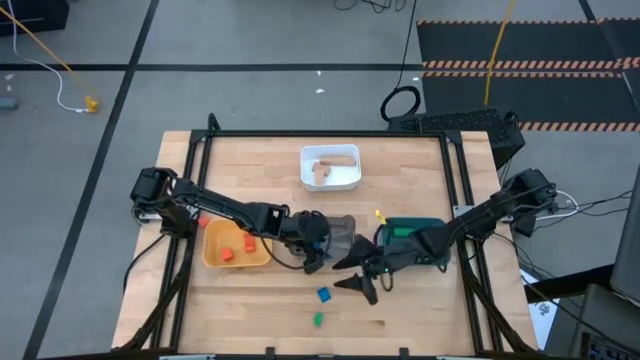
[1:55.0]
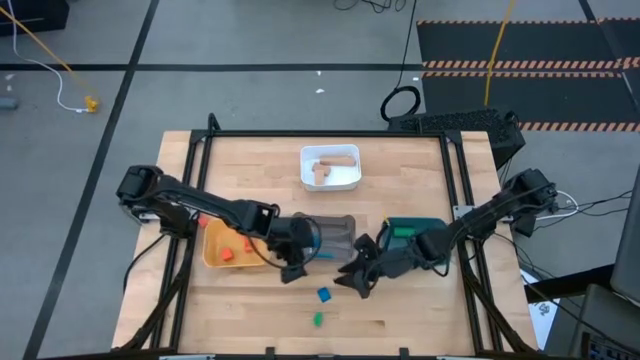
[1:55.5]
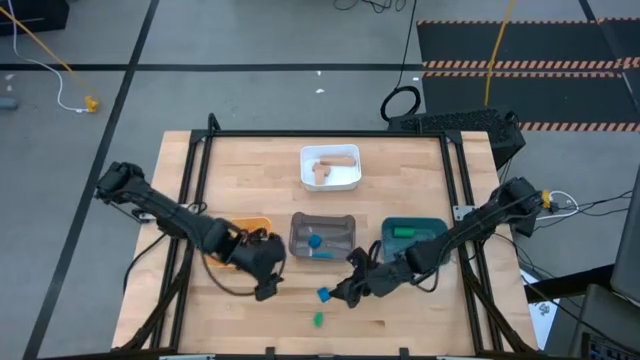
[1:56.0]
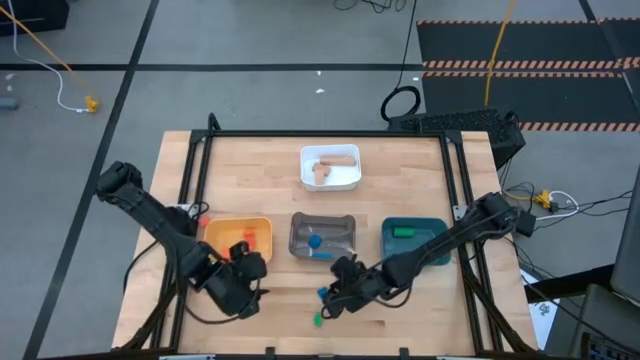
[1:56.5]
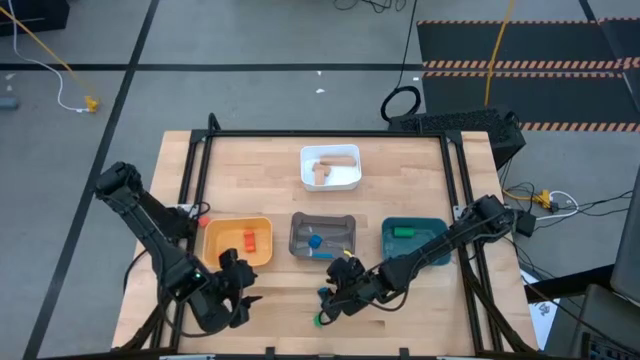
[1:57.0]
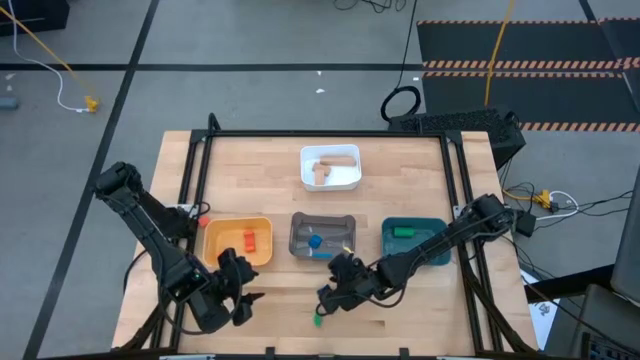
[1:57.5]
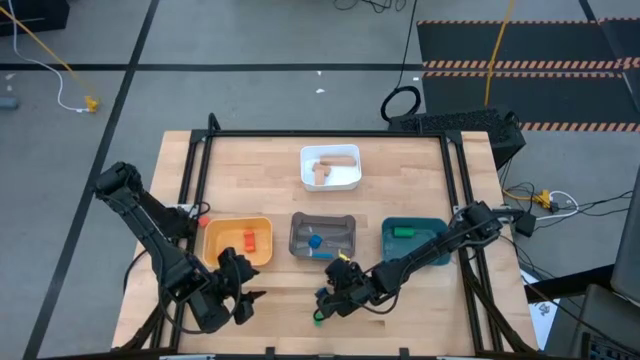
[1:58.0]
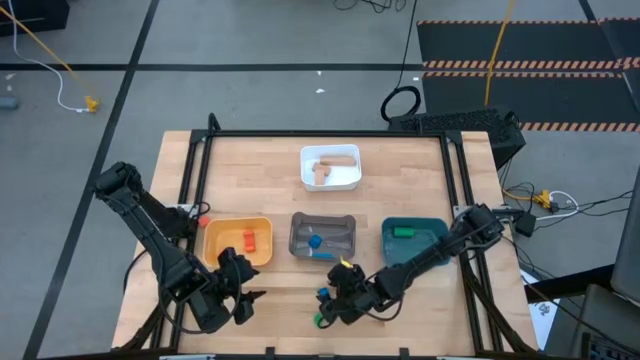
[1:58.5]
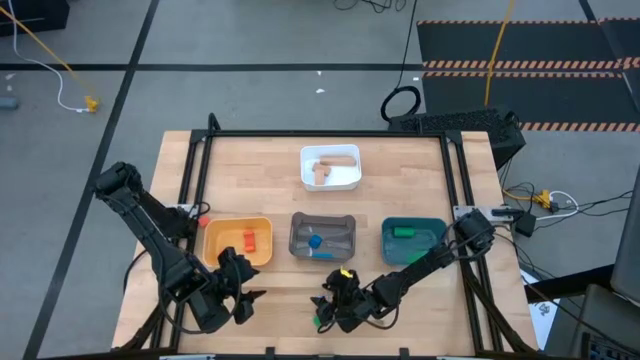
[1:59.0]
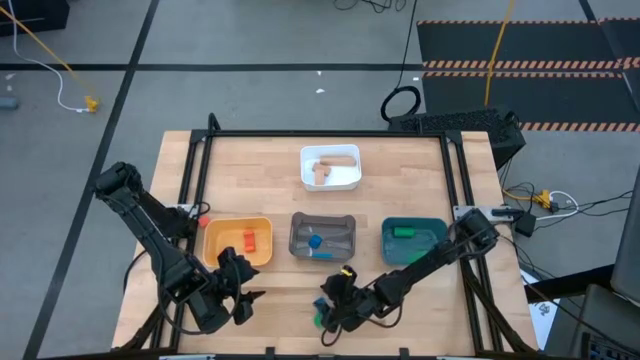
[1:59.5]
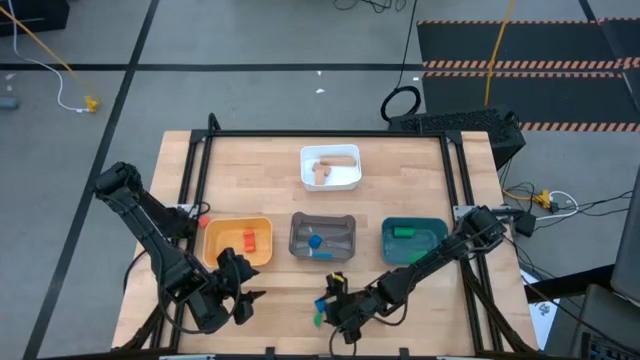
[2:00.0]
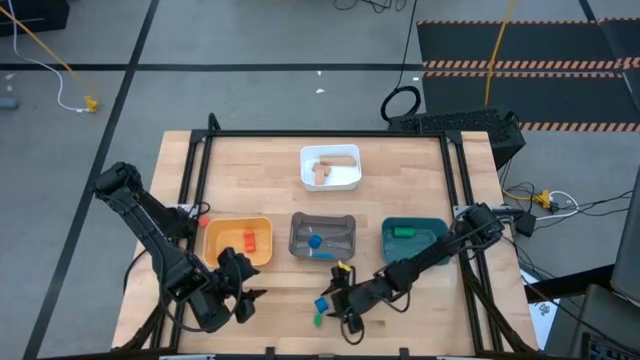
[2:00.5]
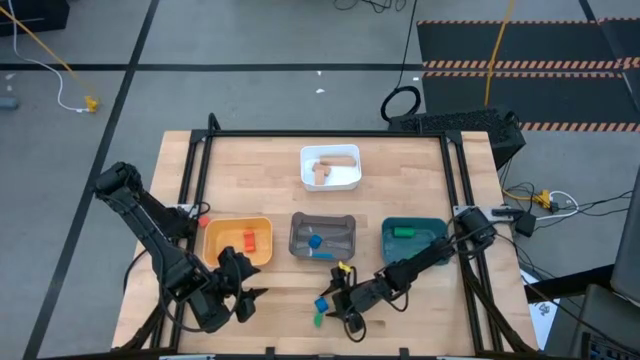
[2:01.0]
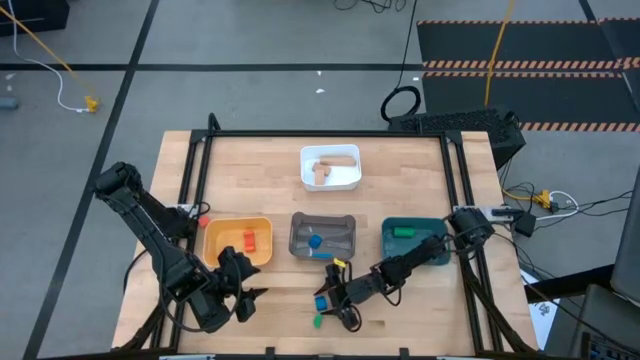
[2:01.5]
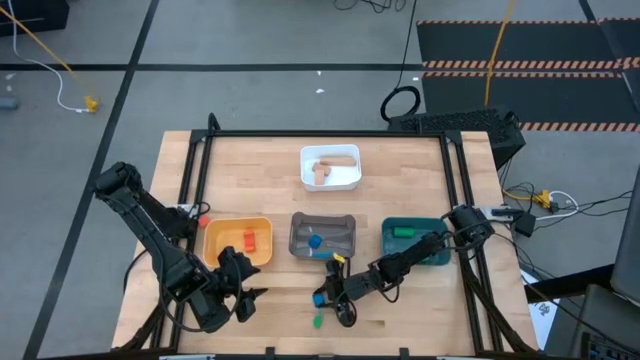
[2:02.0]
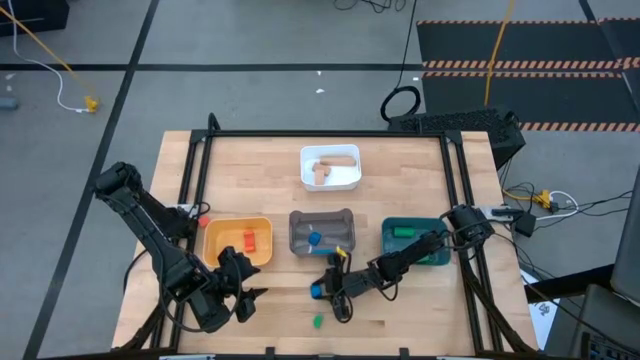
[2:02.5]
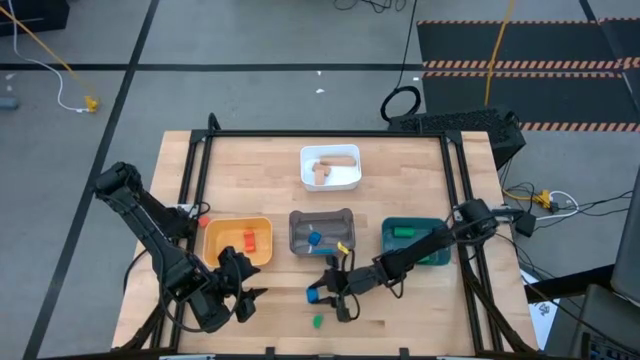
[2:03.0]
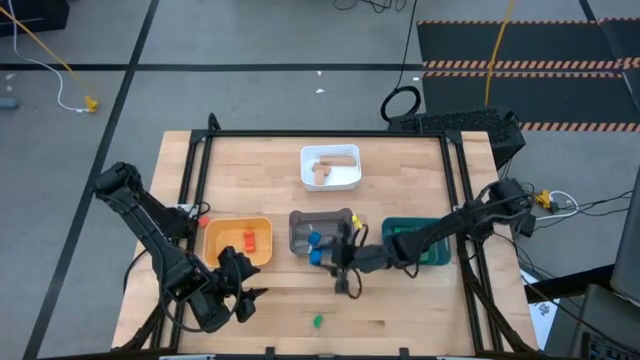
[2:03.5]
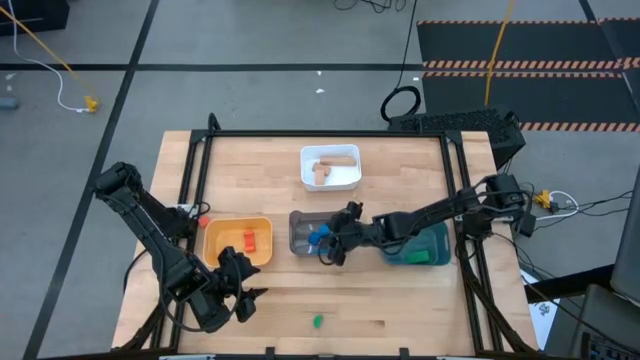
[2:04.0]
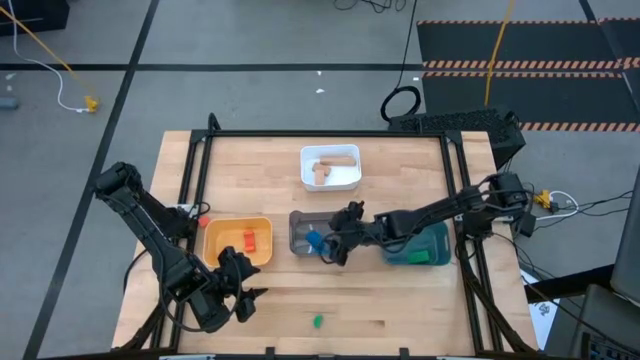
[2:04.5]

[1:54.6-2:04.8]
Task: Sort & place blocks by color
Put the blue half circle block into the black bin

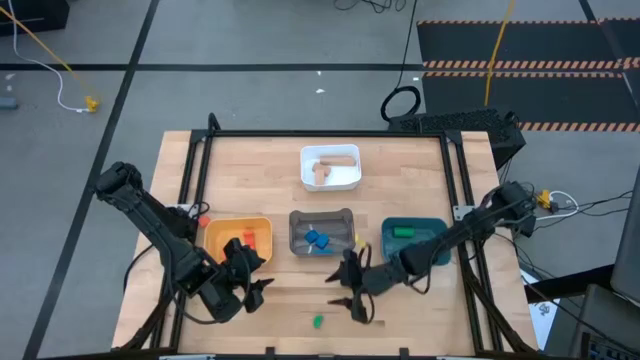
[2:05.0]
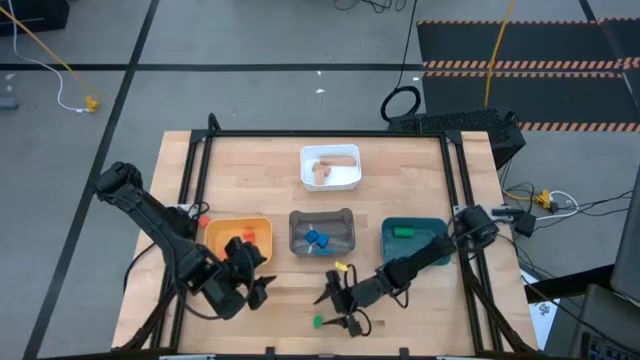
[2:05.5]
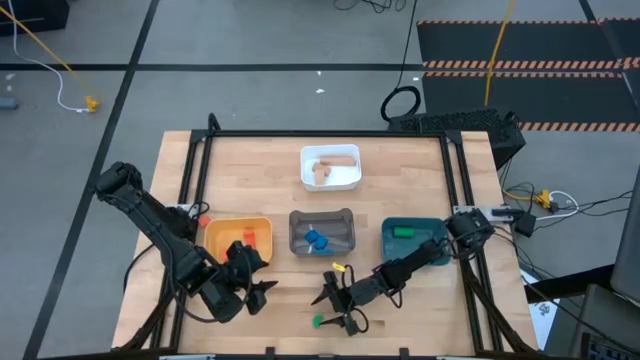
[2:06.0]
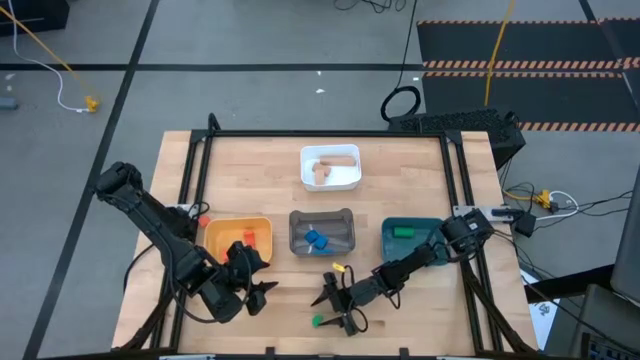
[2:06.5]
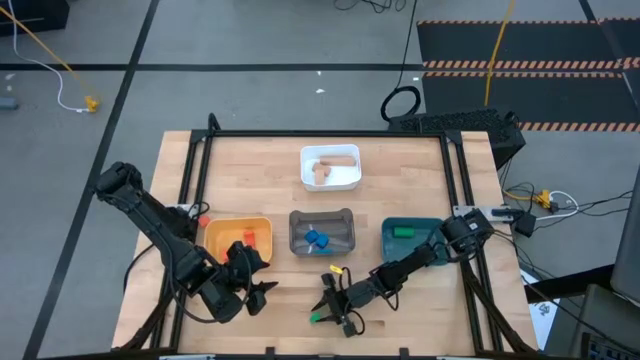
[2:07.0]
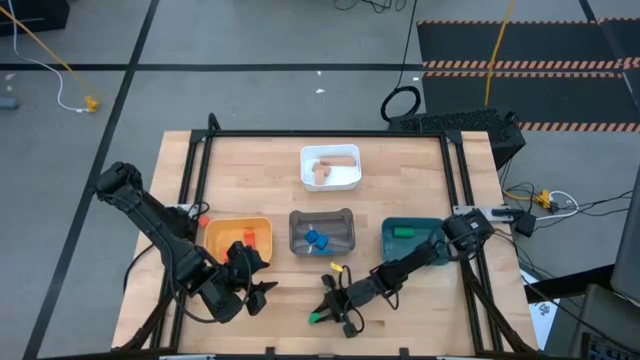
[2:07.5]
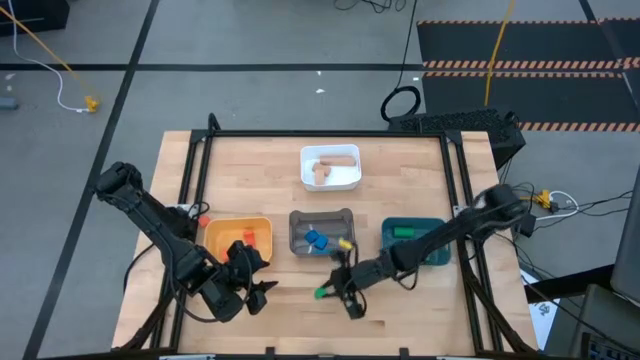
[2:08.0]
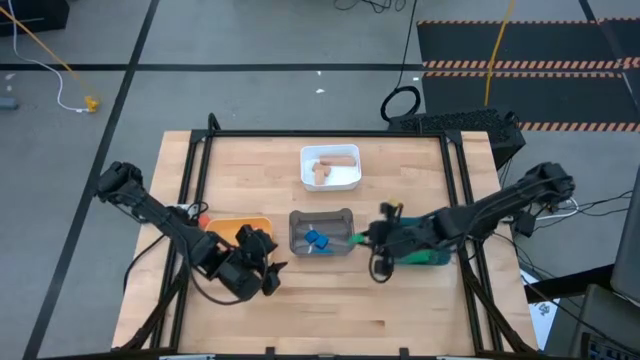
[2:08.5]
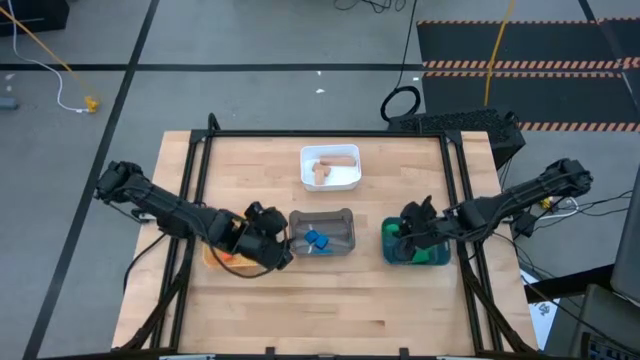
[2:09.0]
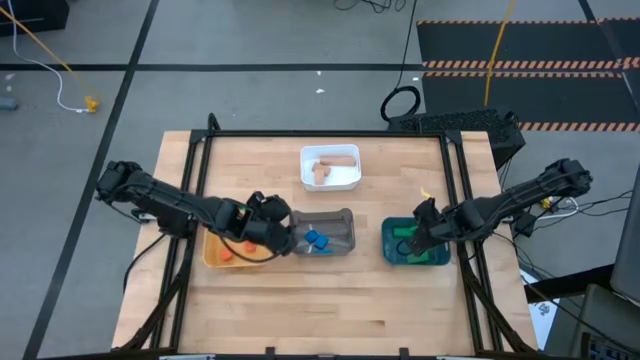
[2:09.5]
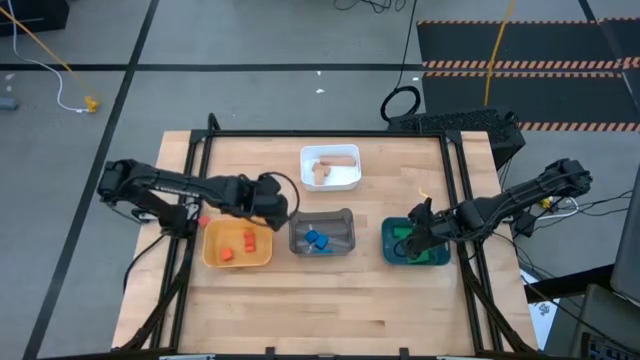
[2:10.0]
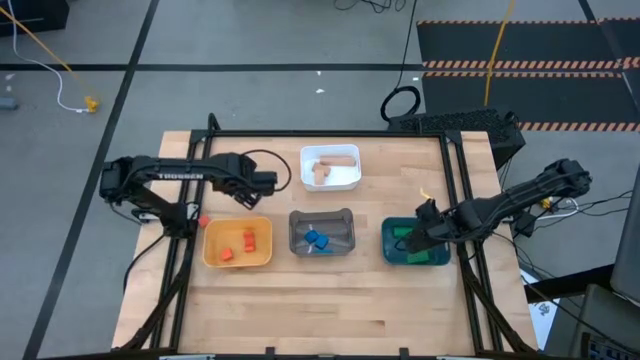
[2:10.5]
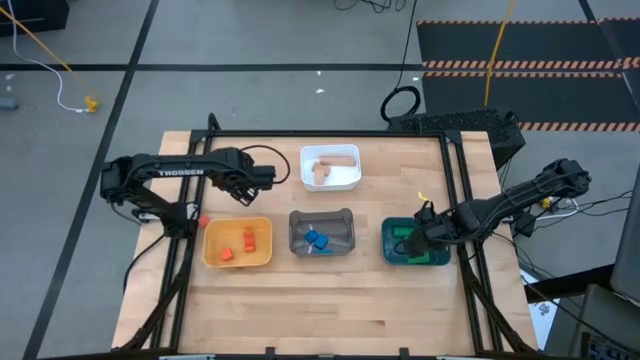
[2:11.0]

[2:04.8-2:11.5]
Put the green half circle block into the dark blue bin

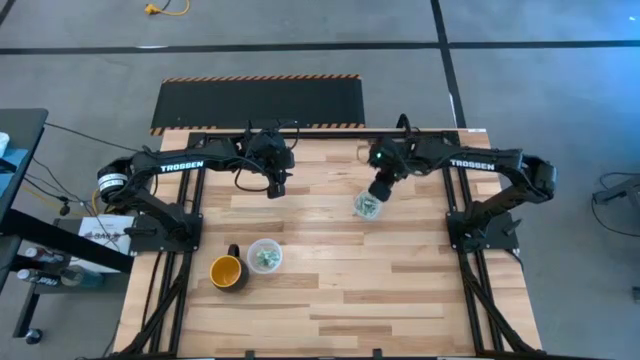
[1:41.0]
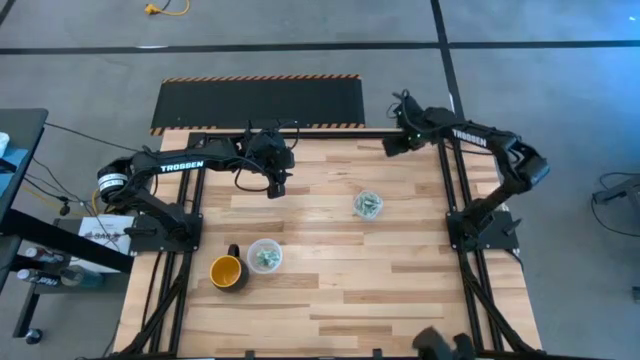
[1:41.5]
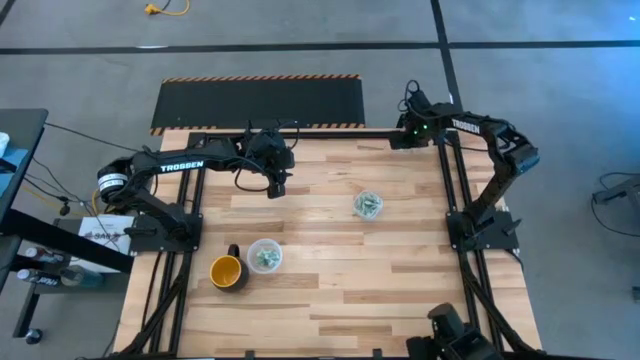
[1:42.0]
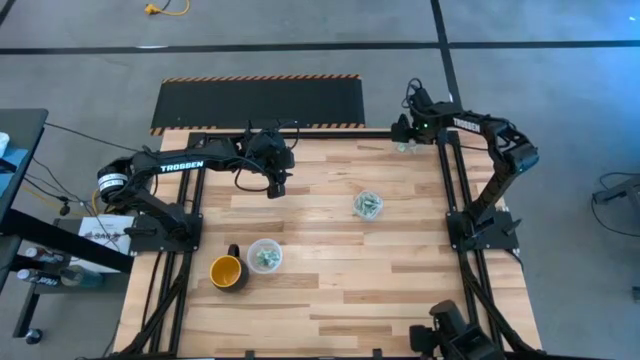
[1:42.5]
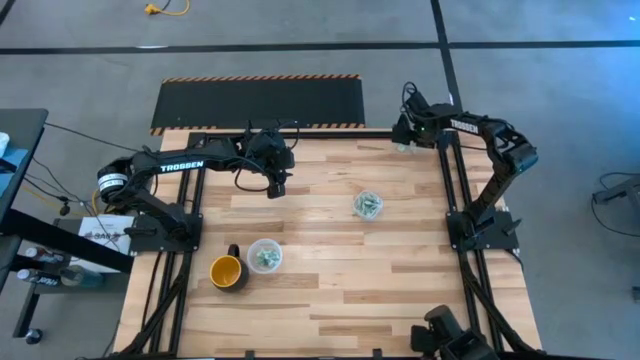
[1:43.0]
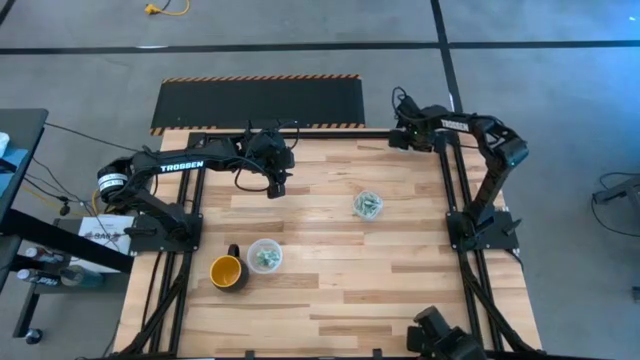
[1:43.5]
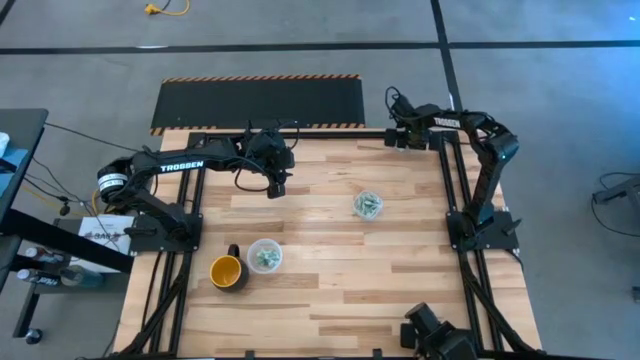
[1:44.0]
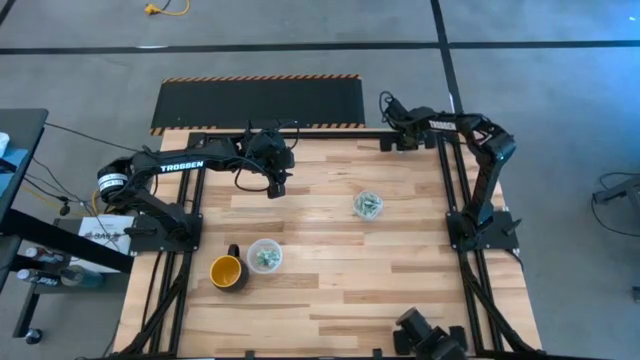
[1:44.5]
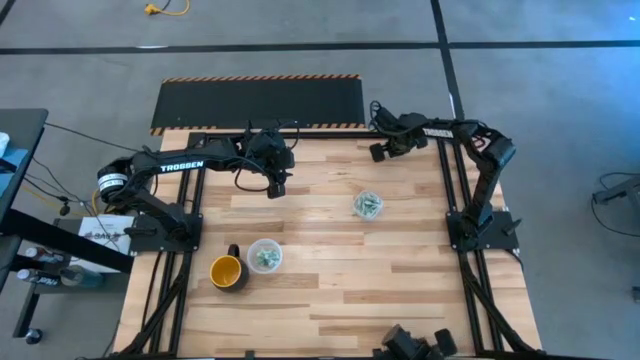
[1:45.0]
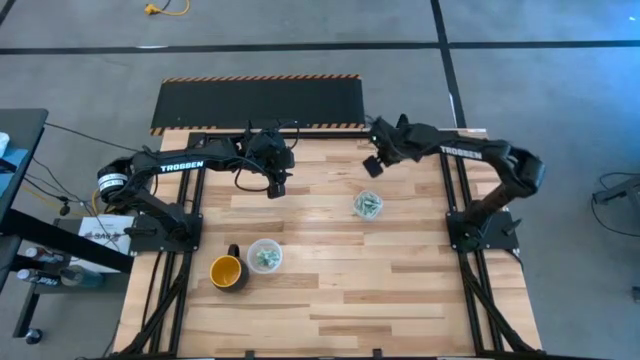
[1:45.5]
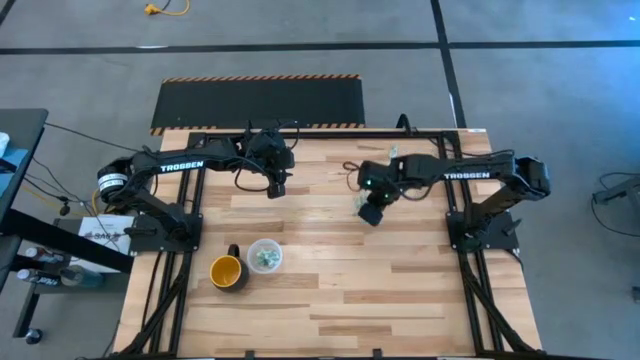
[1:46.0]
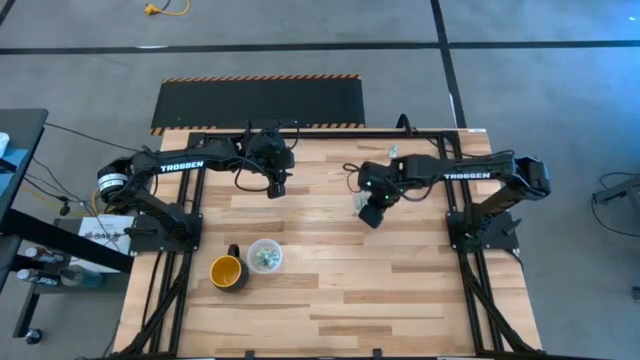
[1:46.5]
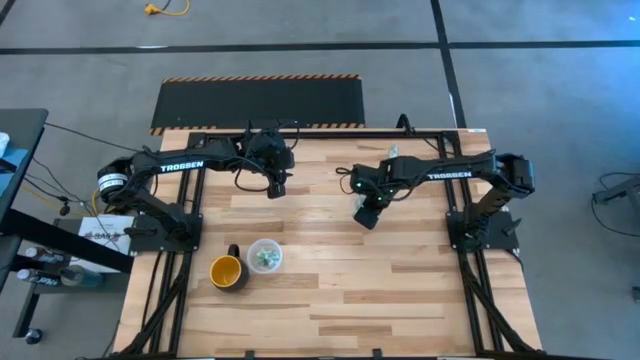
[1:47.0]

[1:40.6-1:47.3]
Task: Pick and place Stevia / Truvia into bins
Put the white stevia packet into the square transparent container
